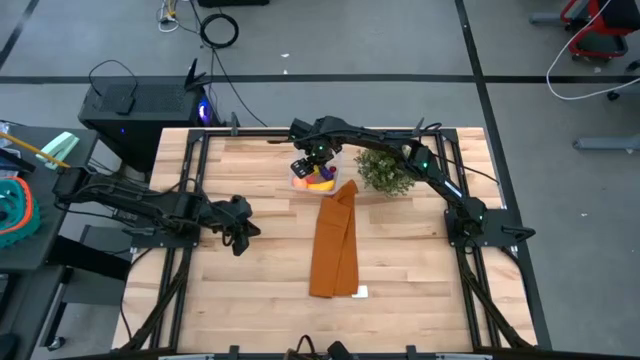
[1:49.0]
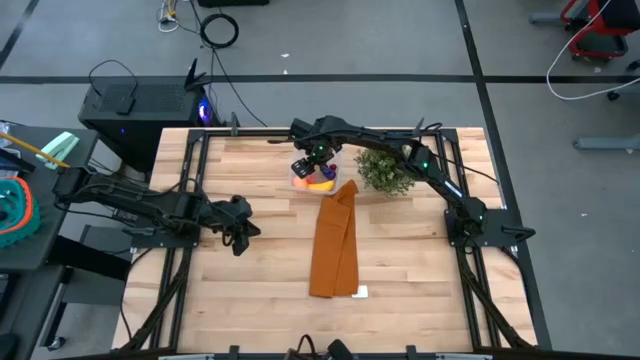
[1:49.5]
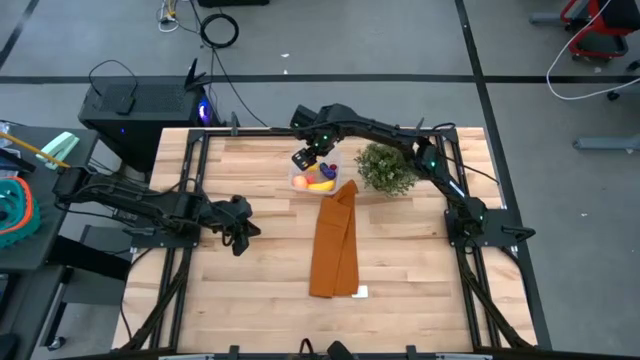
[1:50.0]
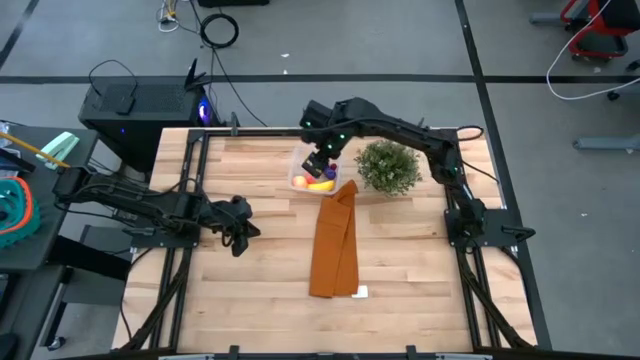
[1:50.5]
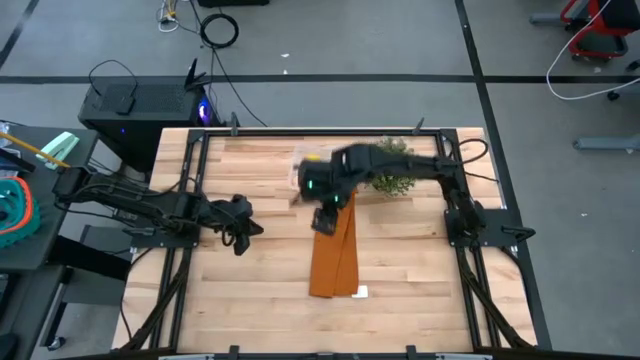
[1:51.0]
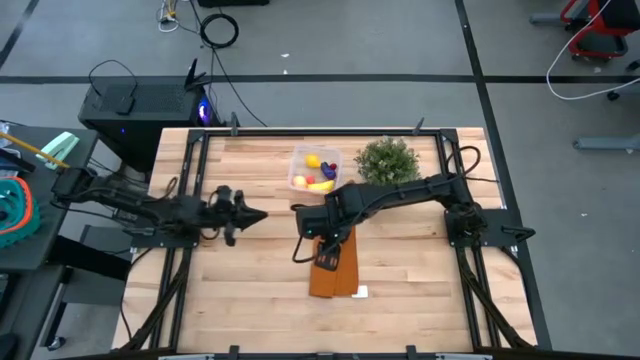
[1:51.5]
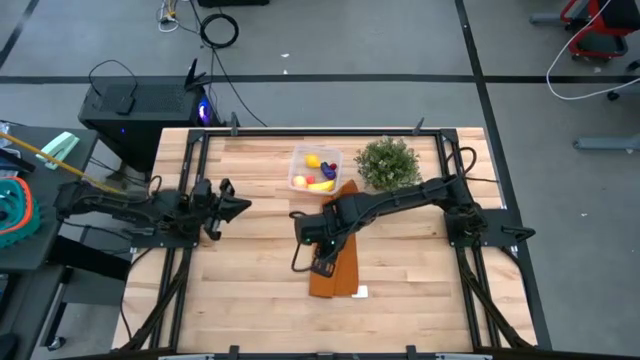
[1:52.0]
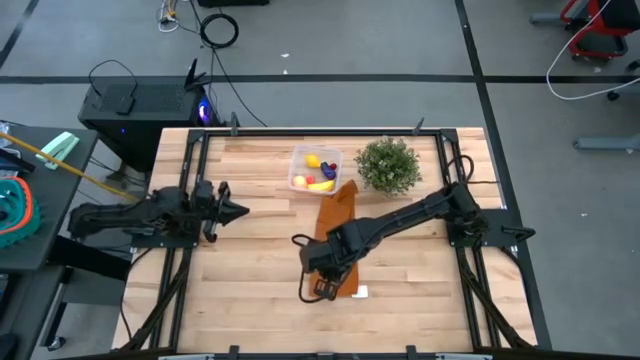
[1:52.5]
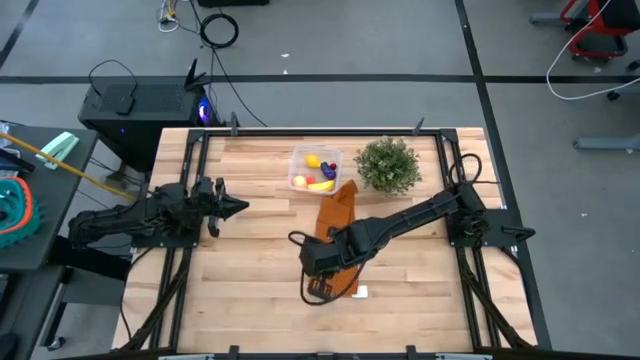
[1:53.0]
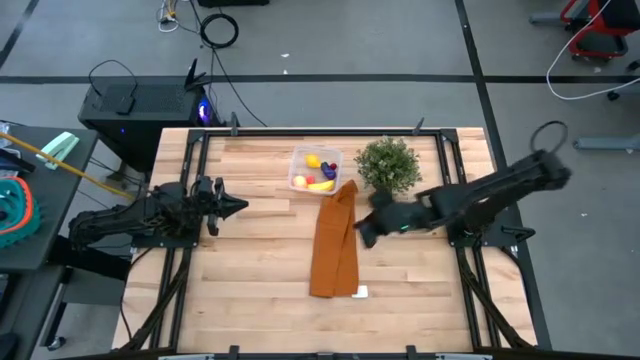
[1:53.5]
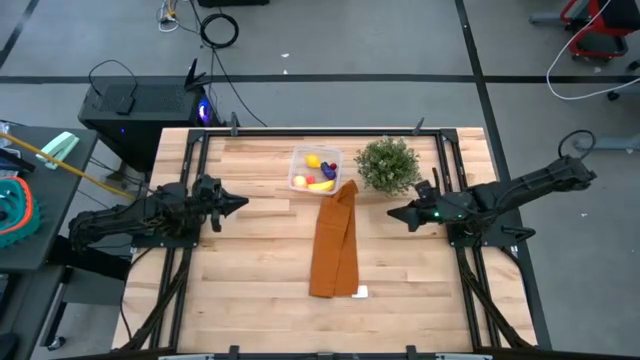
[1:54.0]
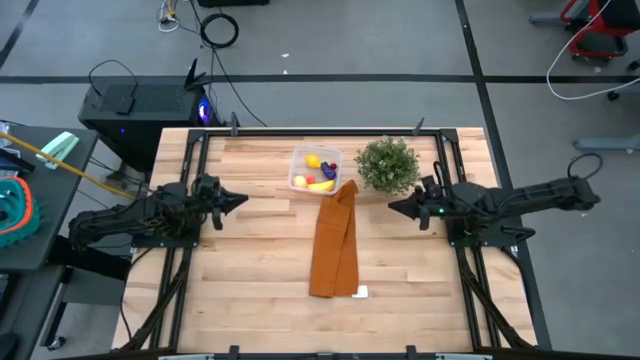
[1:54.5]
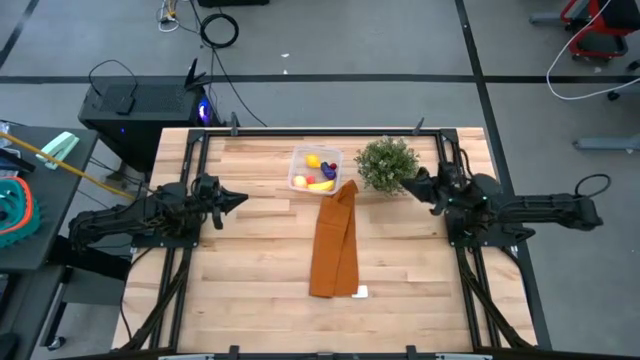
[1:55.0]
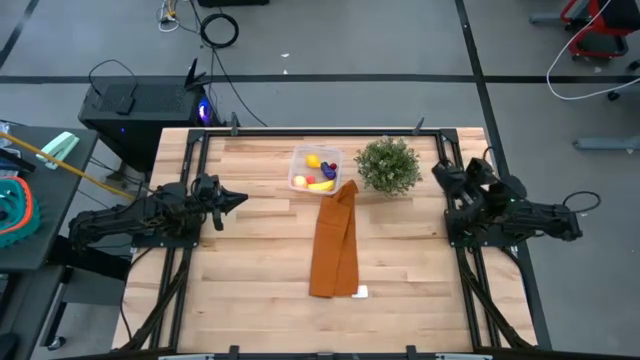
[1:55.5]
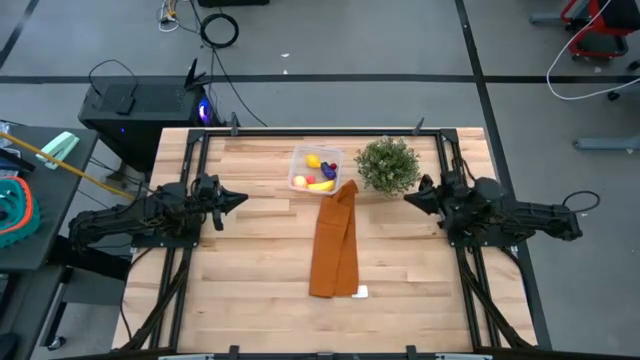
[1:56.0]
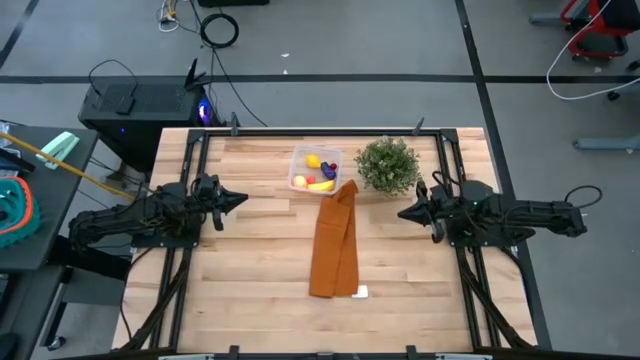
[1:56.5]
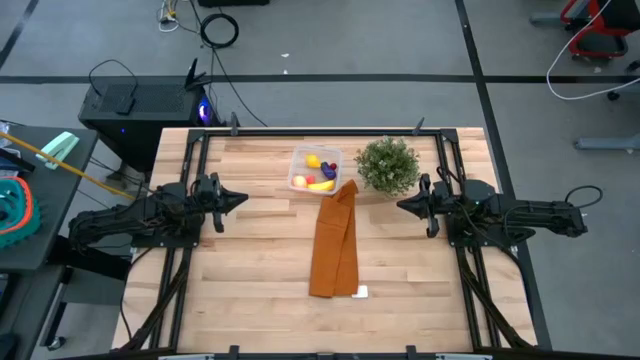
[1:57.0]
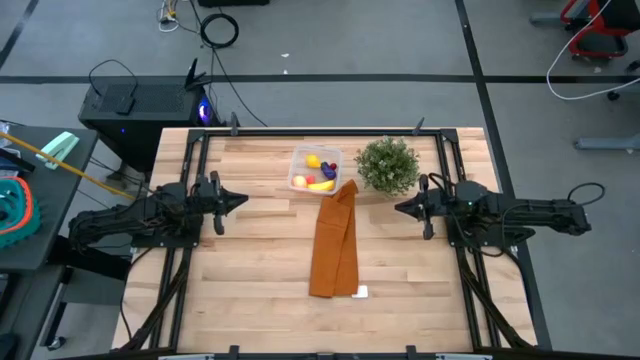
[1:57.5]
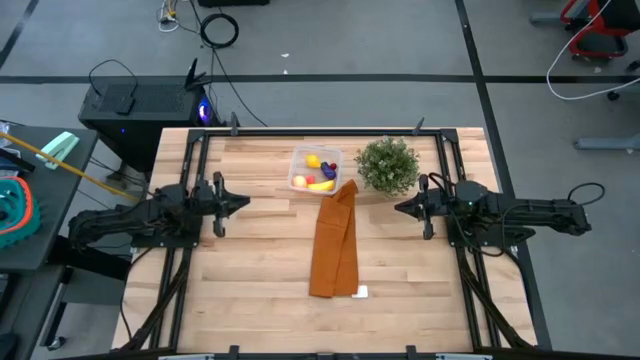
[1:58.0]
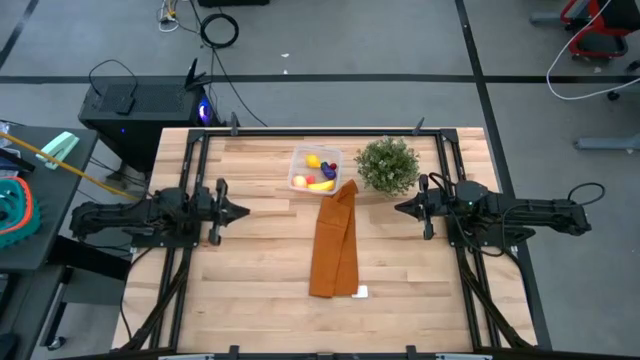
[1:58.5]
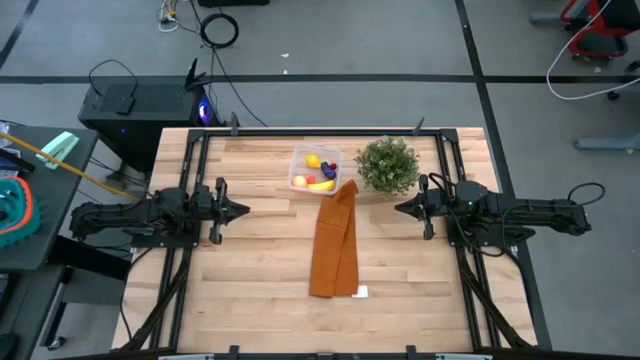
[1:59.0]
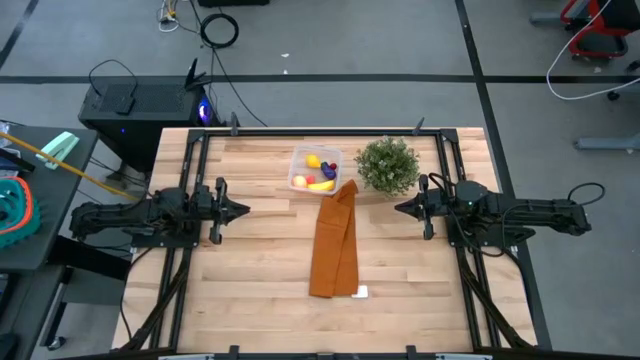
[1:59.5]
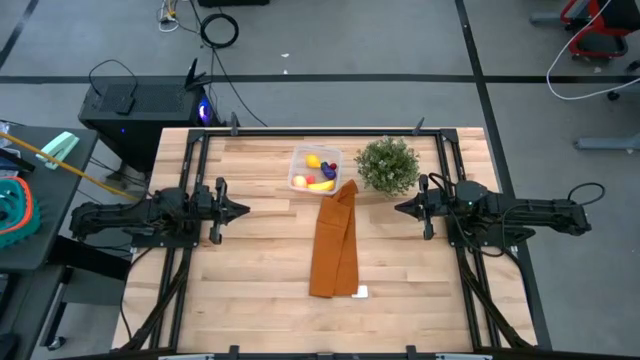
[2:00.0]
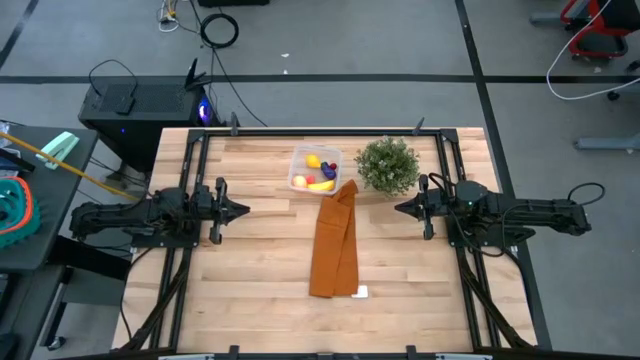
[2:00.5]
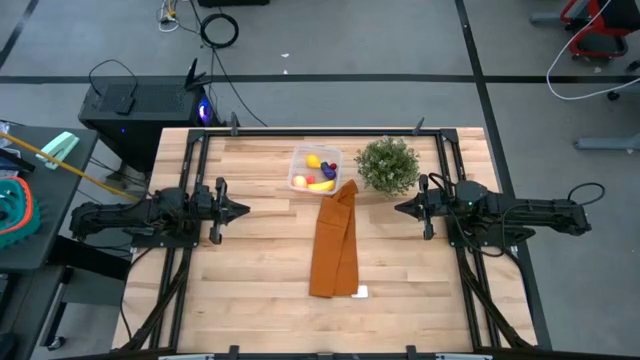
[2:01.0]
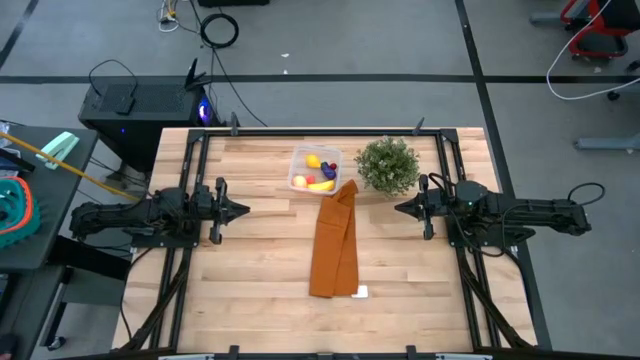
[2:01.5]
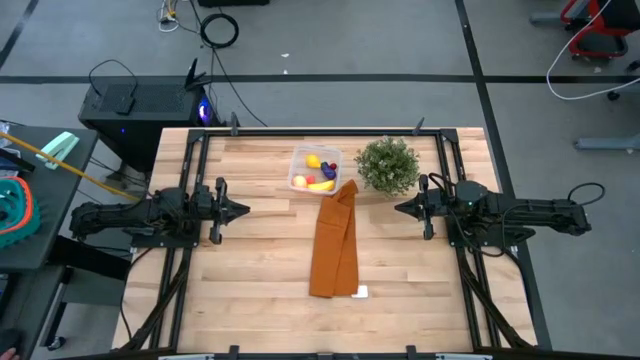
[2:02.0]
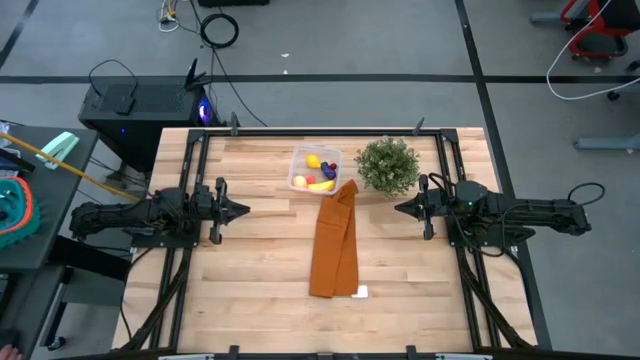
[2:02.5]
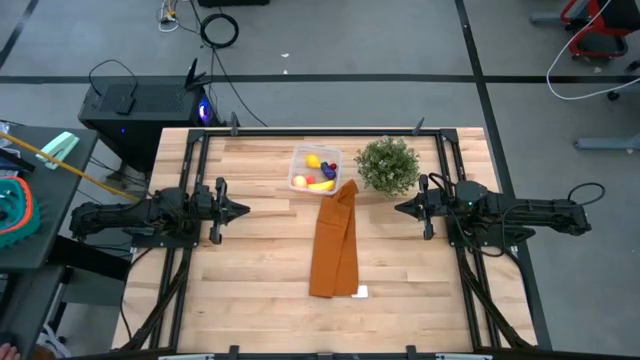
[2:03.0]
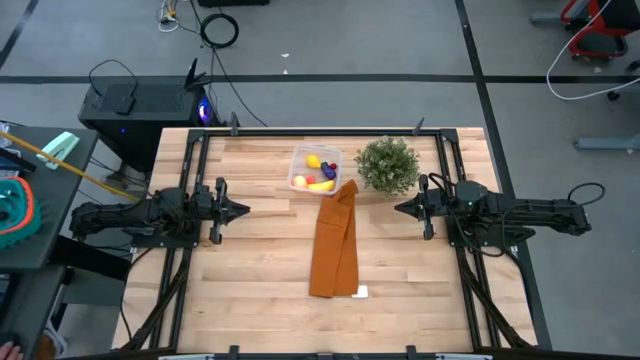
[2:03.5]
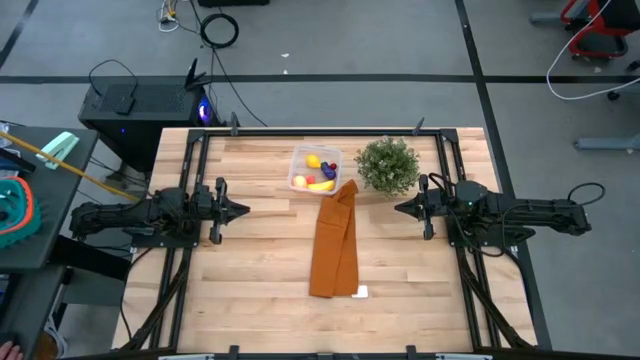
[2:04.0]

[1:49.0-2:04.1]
Task: Pick and placing Produce into tupperware
Return to Home Position

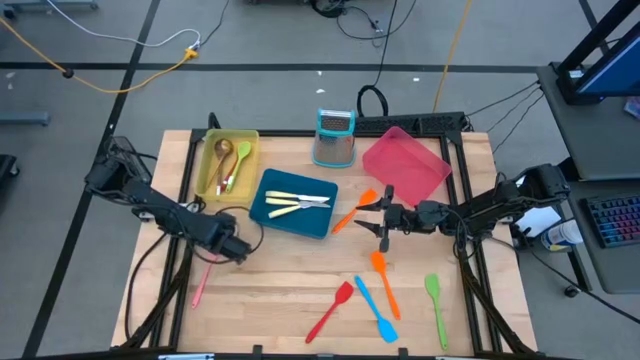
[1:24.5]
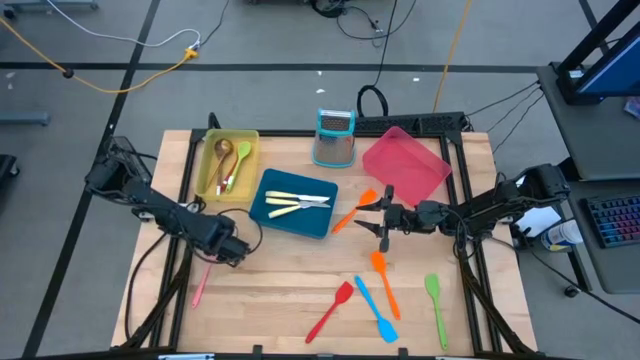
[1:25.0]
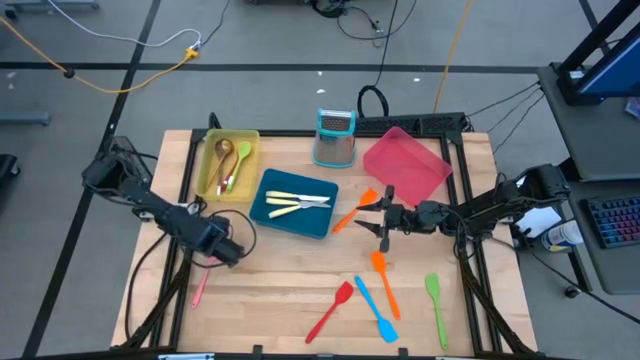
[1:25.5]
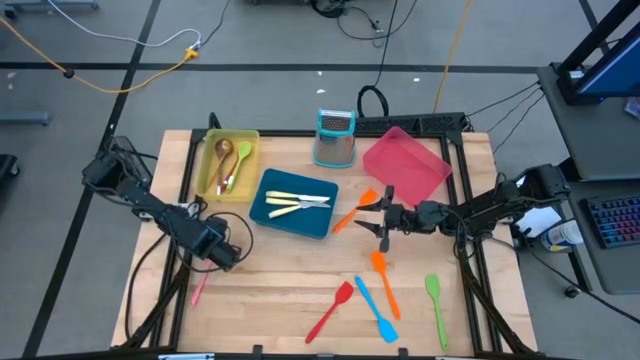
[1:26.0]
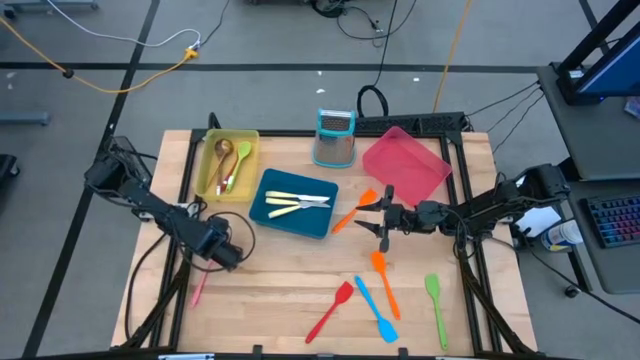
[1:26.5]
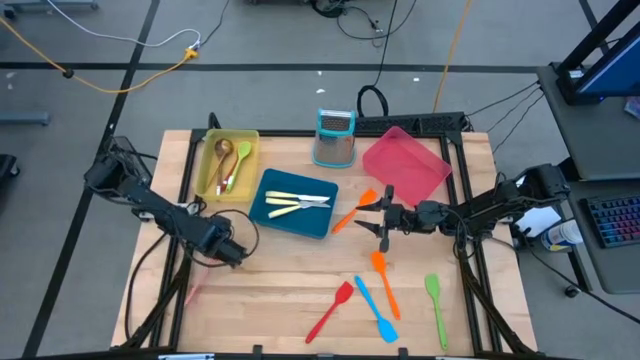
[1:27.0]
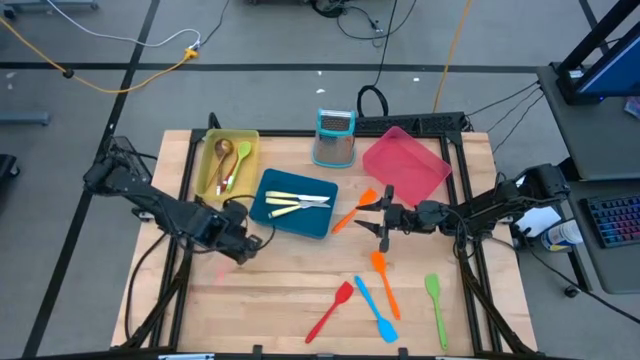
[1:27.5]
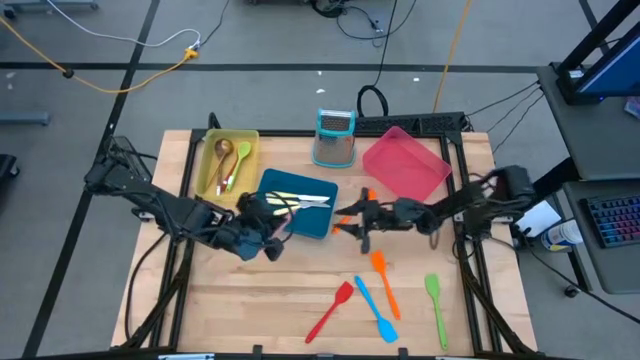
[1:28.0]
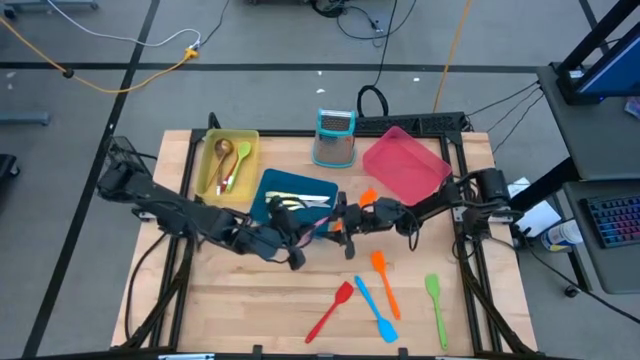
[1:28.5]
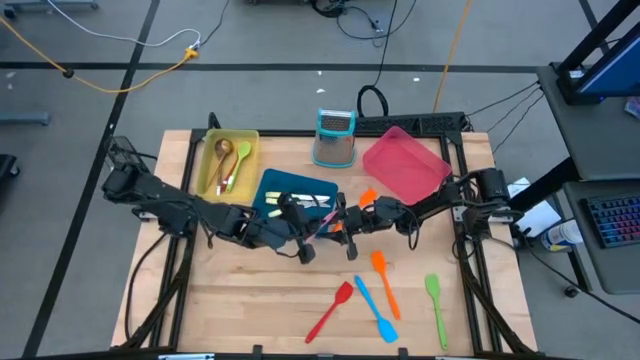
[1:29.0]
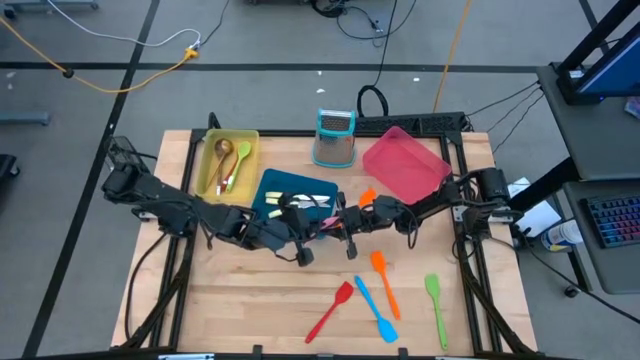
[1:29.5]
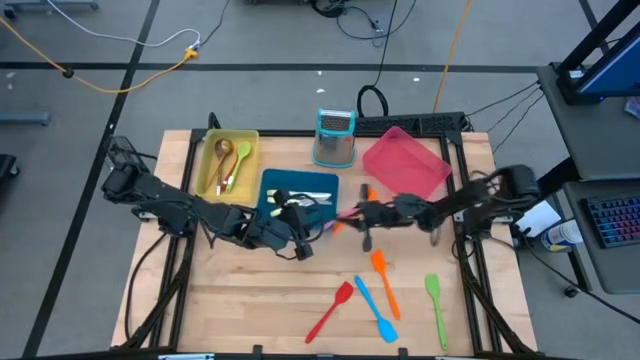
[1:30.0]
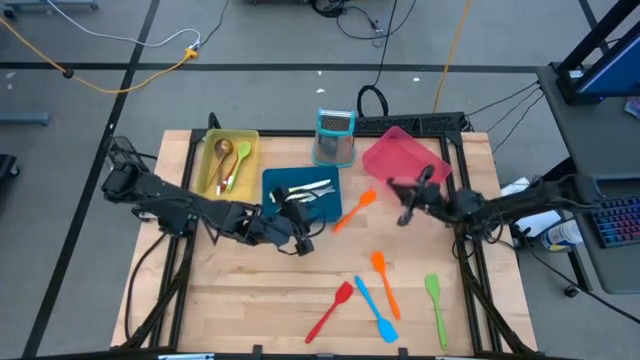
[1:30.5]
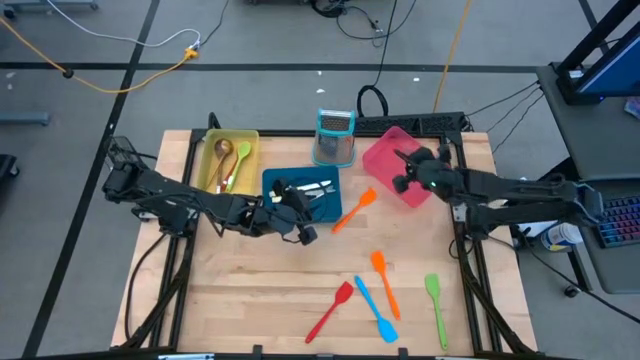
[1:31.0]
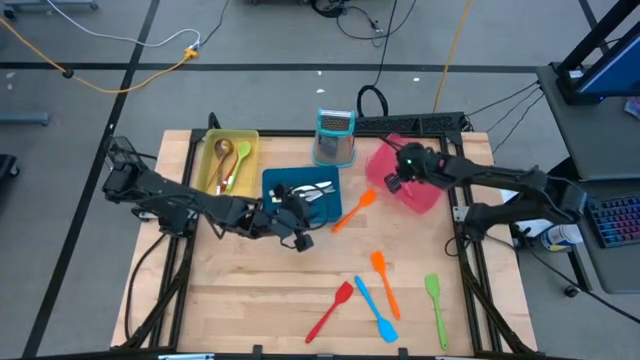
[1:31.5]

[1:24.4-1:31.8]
Task: Pick & Place Kitchen Items
Put the pink spatula into the red bin
